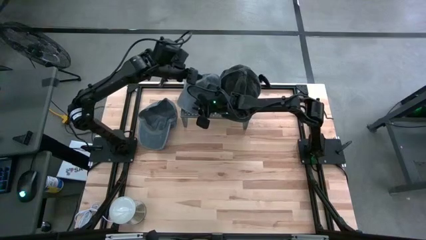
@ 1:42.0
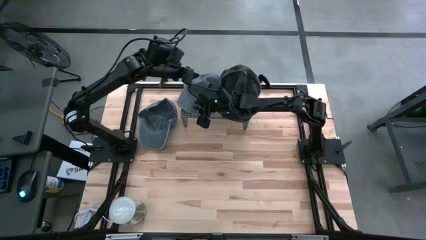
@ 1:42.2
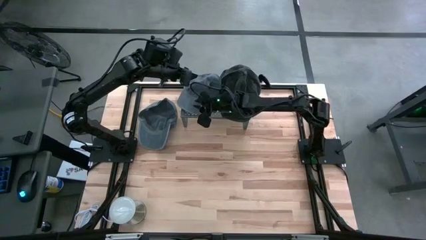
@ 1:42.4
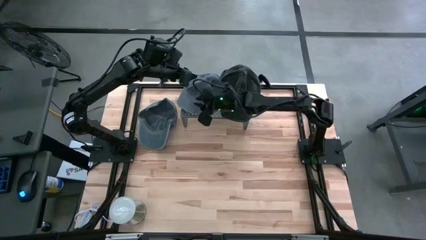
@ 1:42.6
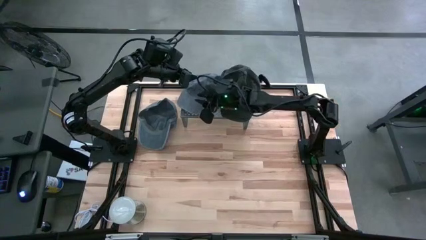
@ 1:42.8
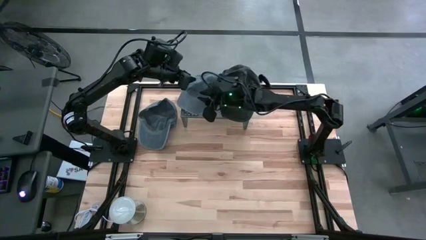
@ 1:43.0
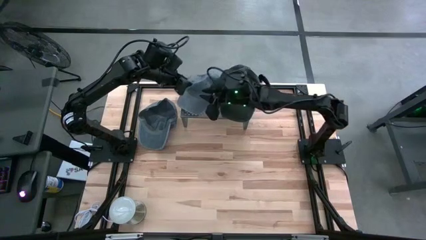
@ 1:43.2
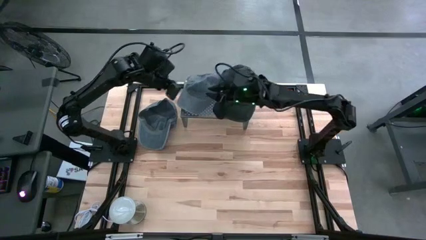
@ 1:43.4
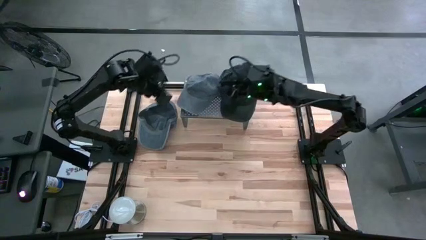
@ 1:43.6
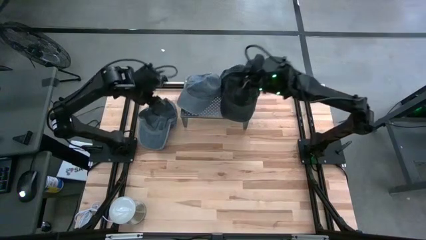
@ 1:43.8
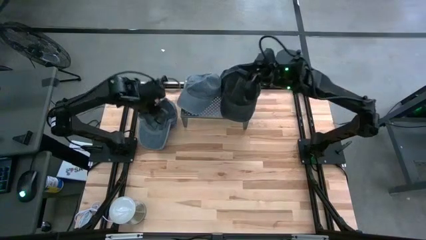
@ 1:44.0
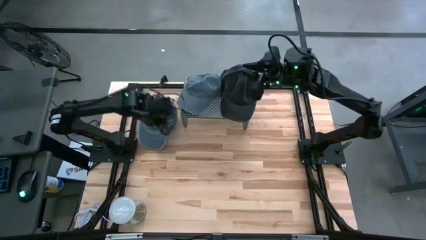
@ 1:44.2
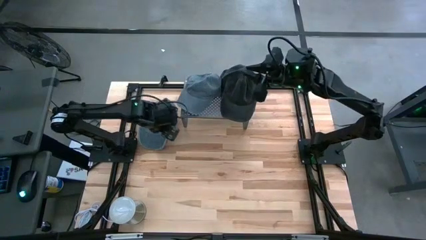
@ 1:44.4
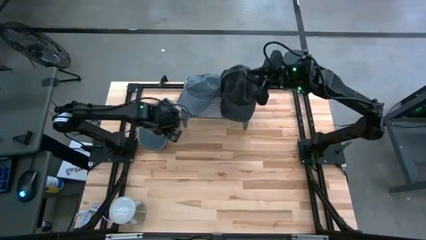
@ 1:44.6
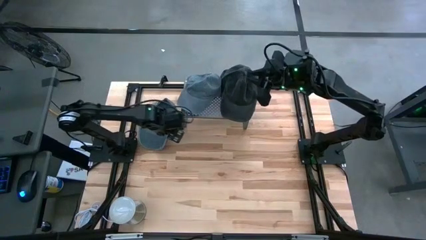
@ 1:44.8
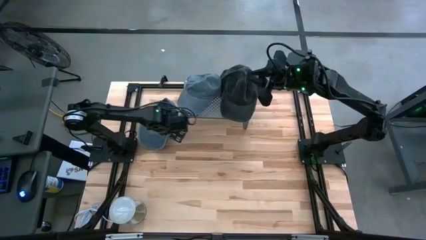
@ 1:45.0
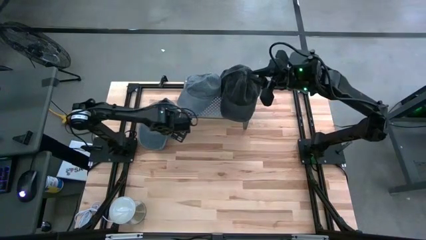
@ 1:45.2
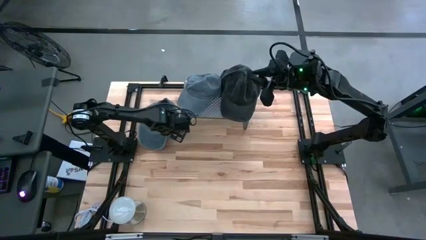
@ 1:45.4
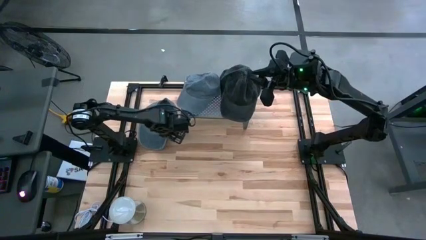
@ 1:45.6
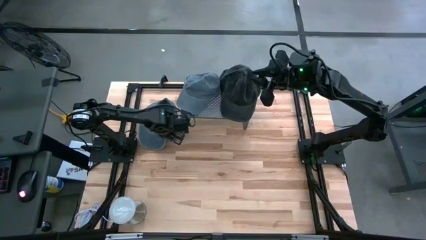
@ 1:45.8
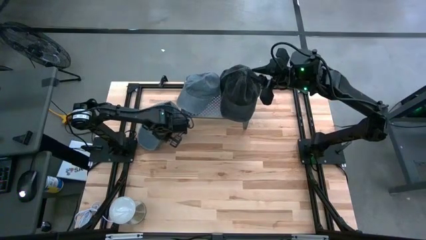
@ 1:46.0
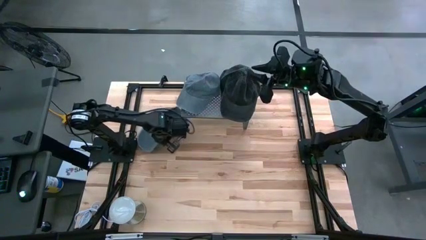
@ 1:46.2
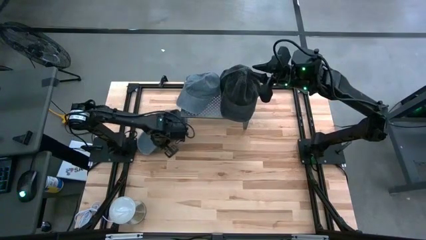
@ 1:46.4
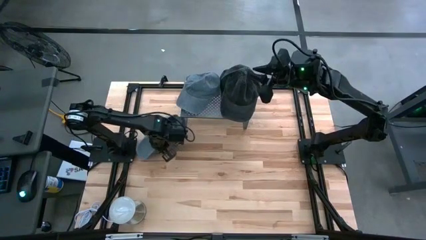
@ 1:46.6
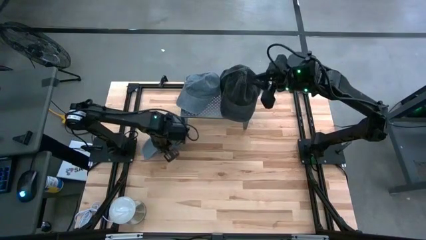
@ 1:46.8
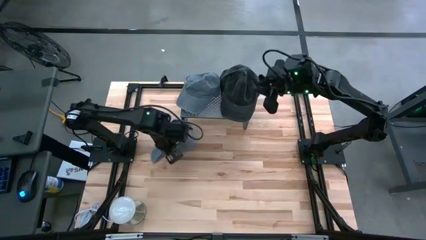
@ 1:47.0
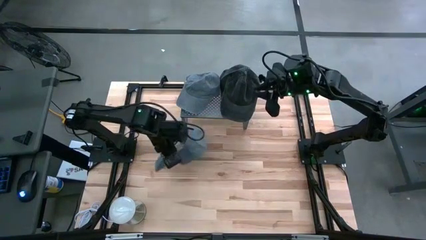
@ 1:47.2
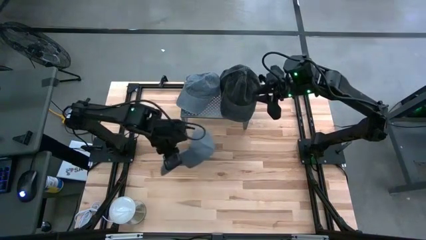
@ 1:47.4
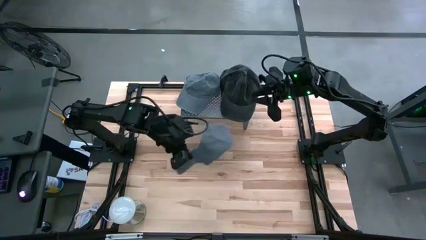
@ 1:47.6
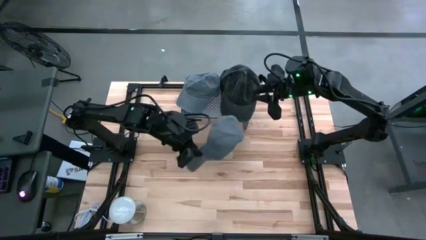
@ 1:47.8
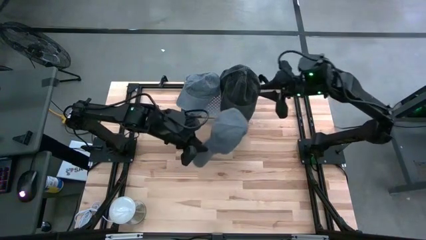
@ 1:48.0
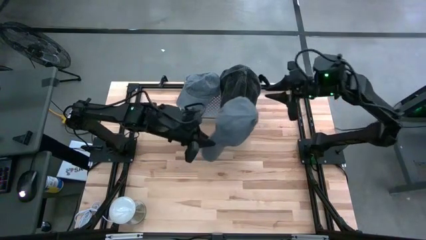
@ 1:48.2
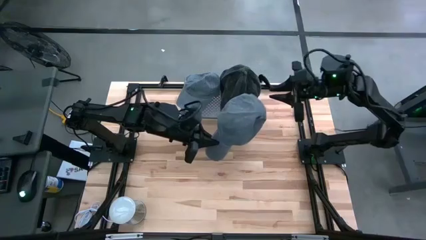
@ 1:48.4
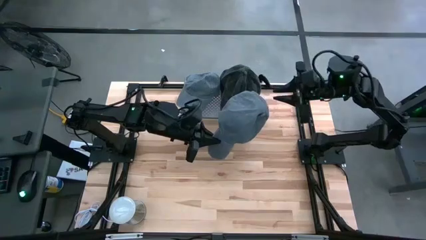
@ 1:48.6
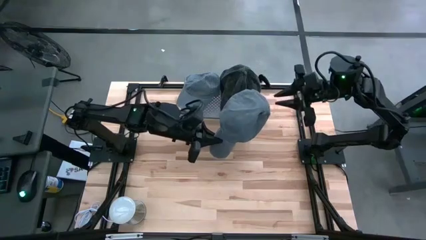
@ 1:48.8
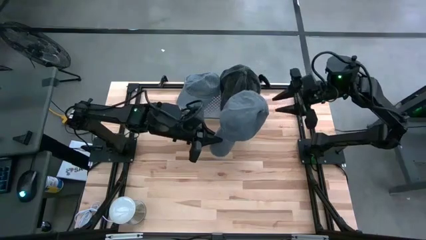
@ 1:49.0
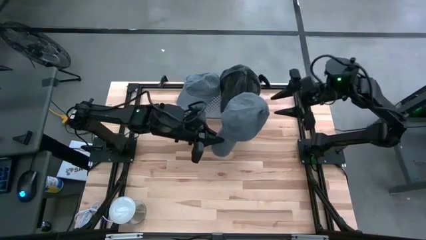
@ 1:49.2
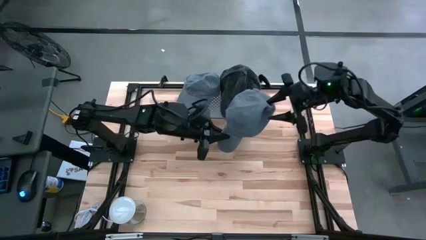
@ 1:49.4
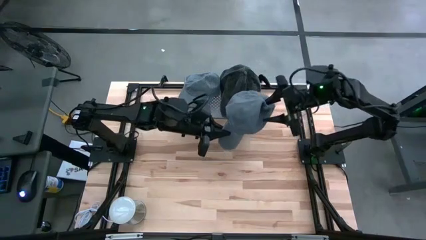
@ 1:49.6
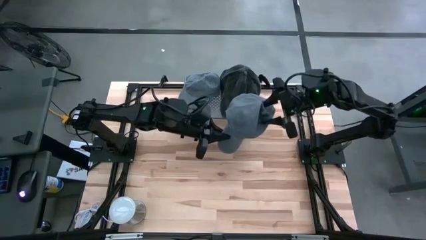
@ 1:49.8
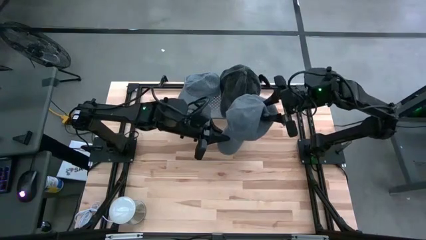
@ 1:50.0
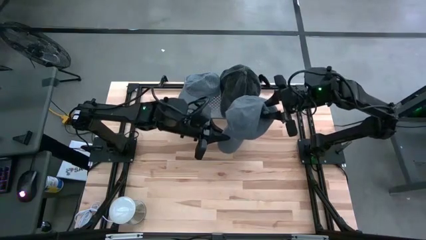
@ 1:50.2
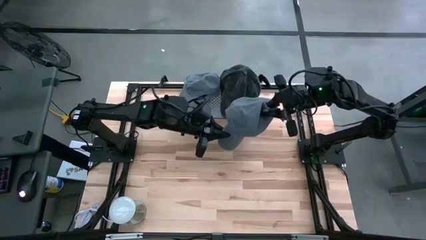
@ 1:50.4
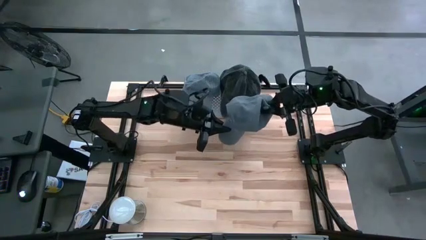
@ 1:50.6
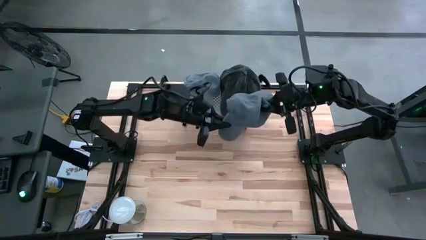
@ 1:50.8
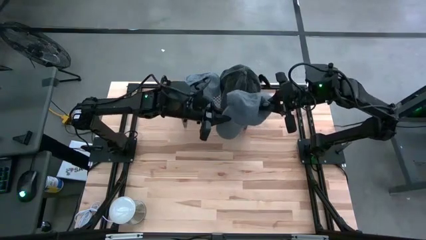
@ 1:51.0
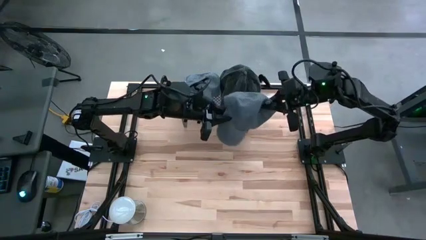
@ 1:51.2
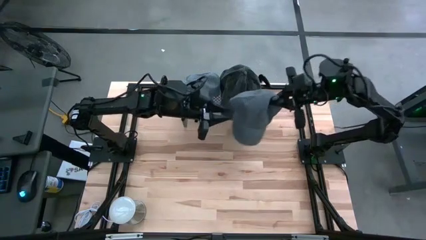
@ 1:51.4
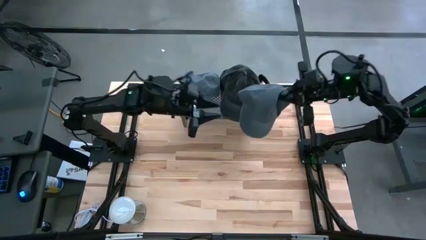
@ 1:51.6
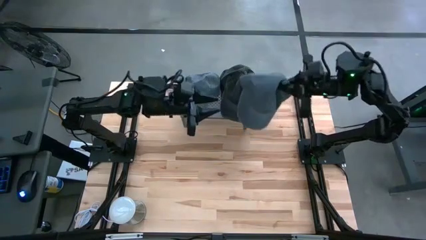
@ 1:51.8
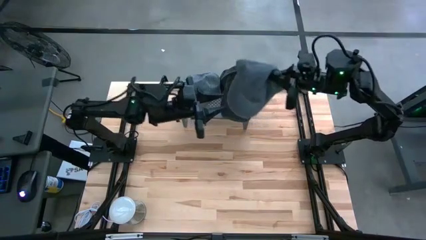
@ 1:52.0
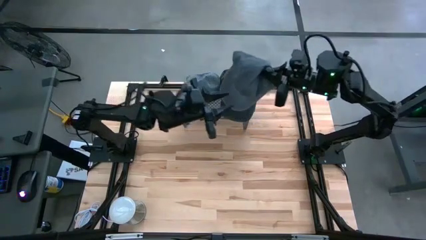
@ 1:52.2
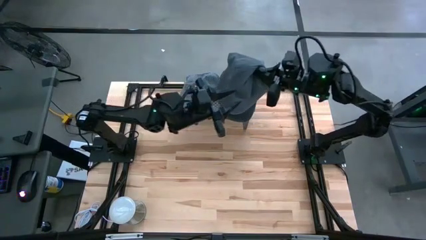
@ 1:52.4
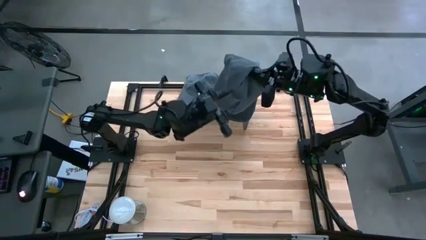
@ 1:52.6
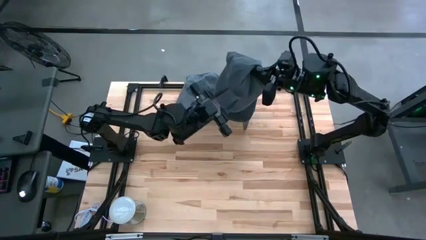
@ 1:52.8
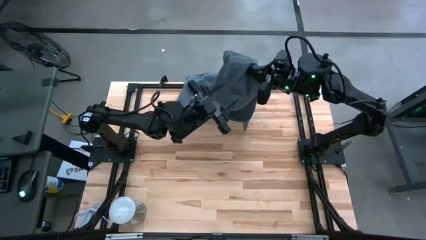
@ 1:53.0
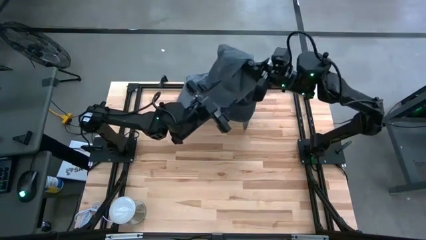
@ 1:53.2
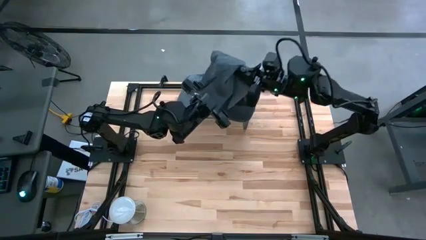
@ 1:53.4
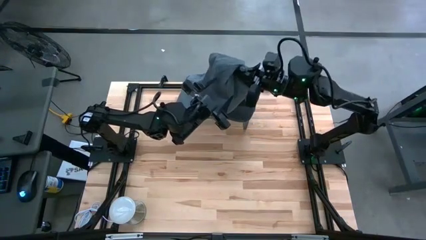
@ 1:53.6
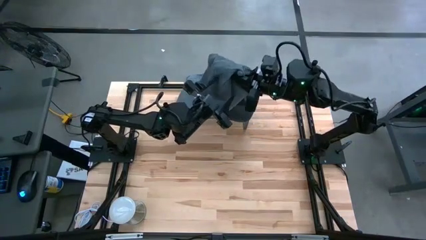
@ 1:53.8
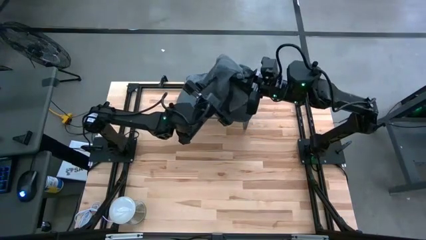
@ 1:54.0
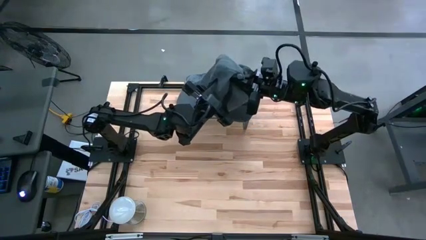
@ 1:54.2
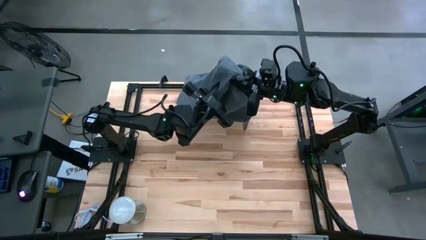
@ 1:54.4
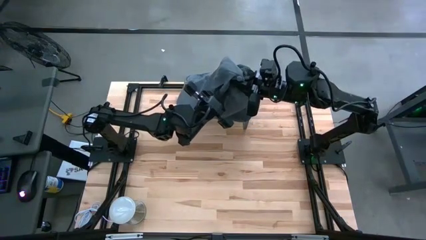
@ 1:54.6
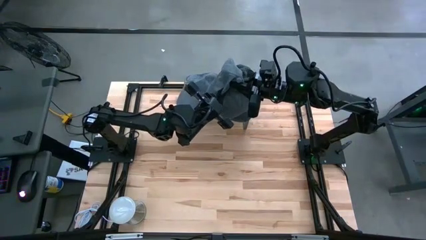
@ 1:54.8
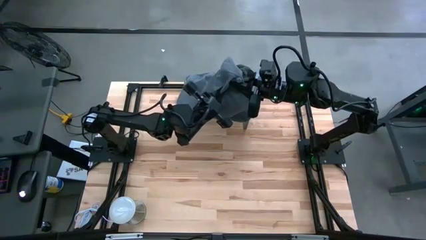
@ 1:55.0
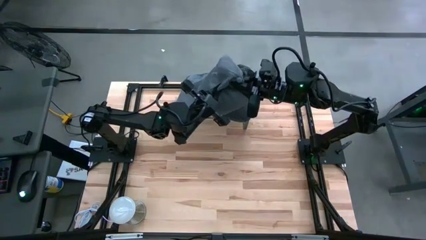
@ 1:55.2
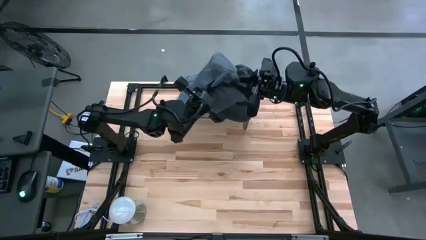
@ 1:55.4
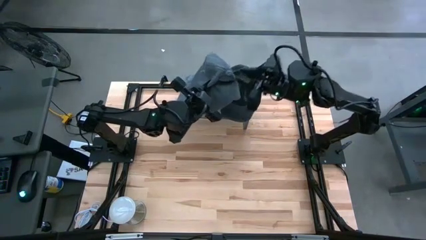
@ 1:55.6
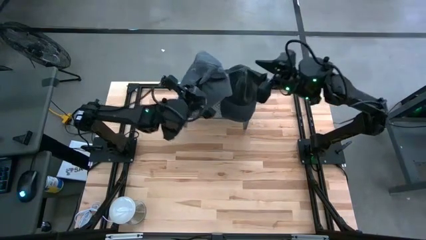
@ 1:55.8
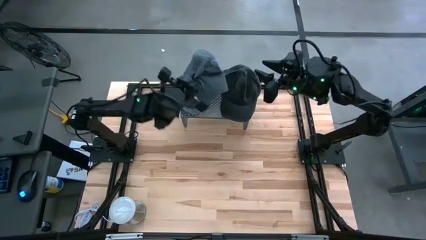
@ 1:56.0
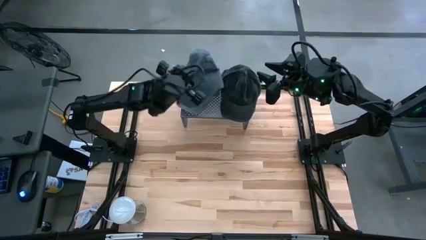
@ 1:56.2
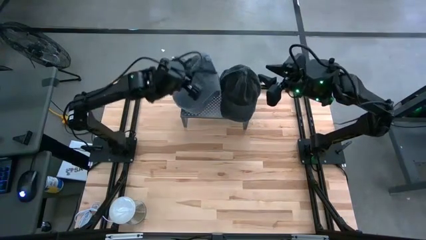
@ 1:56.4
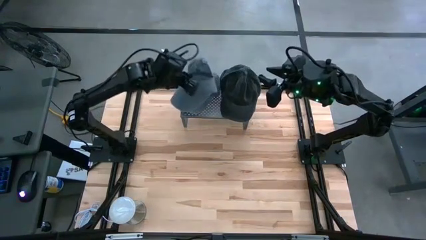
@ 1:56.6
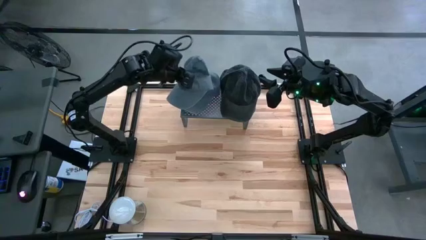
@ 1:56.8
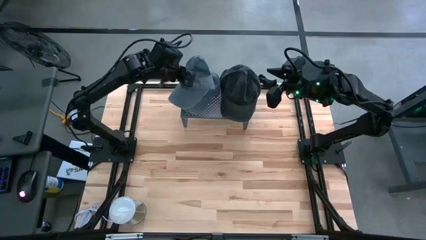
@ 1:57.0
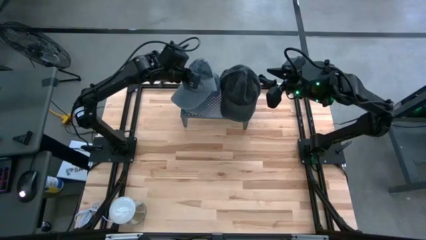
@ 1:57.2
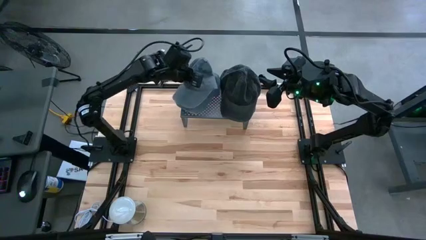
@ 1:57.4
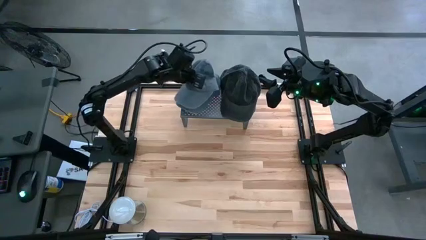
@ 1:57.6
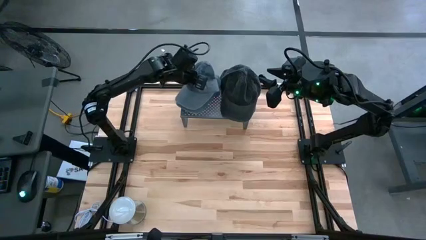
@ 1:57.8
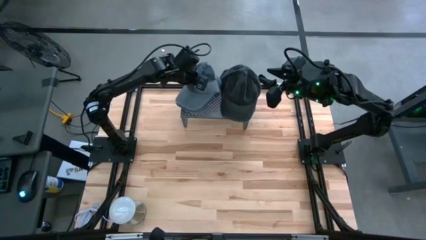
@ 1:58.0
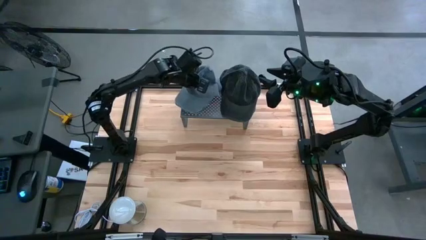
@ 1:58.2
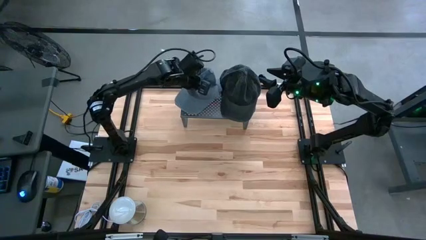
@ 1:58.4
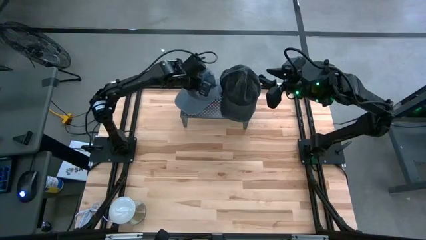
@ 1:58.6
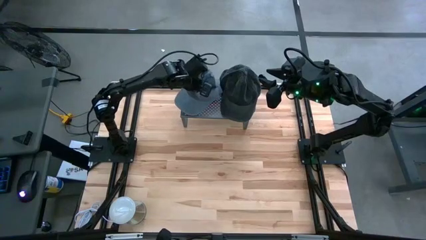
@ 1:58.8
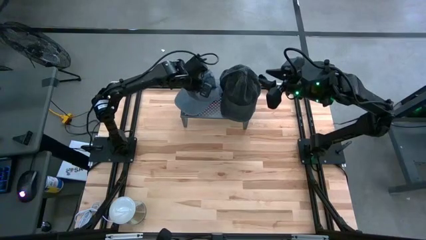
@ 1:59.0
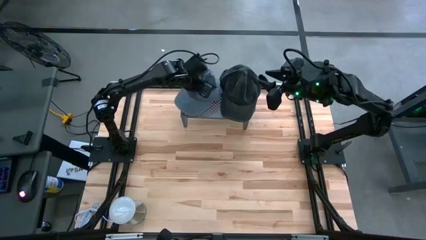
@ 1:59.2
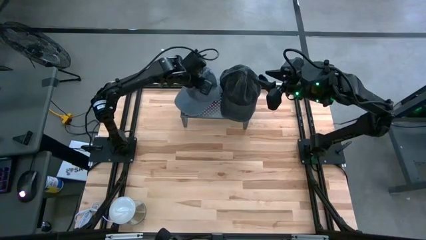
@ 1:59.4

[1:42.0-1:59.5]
Task: Pick & Place hat
Stack the gray cap on top of the gray cap on the shelf
